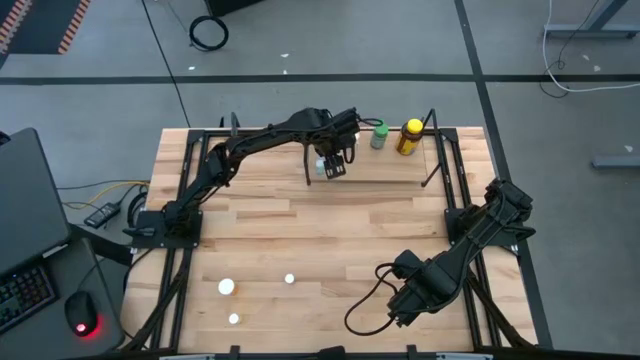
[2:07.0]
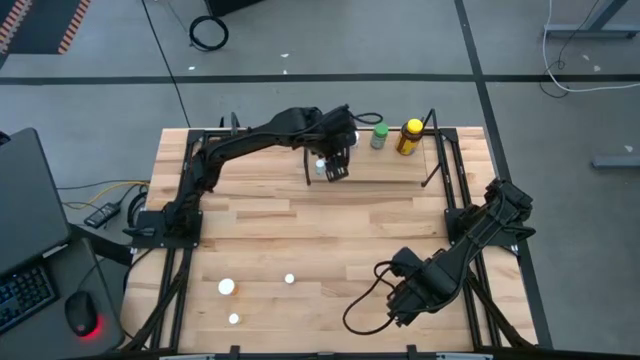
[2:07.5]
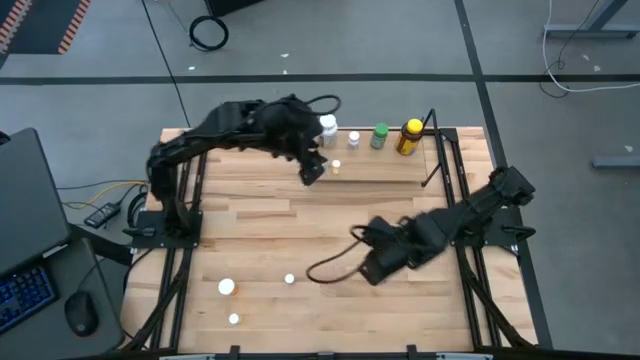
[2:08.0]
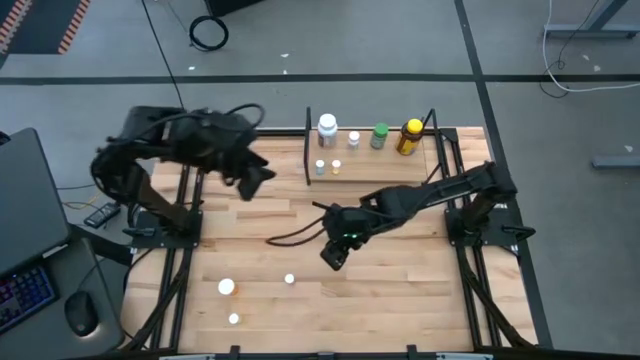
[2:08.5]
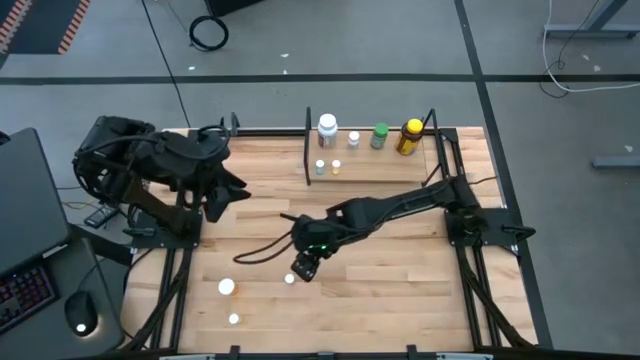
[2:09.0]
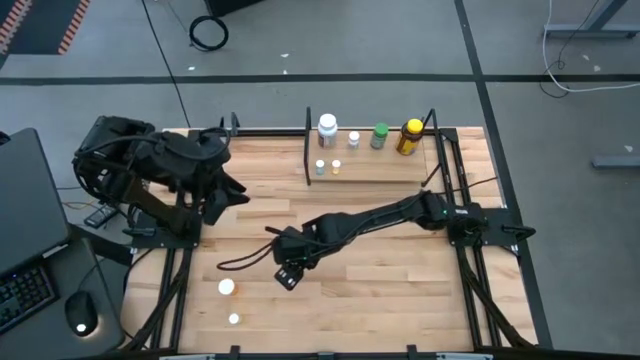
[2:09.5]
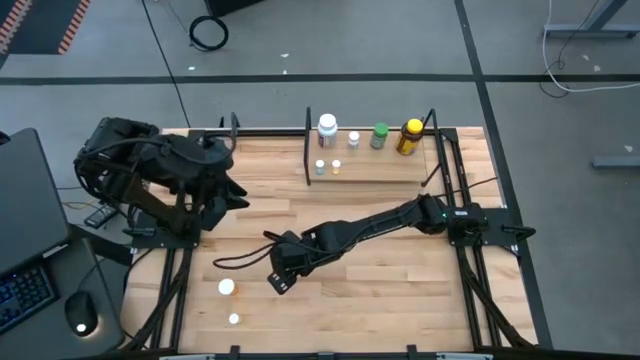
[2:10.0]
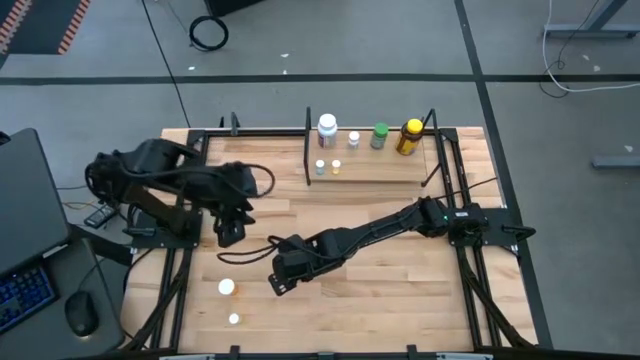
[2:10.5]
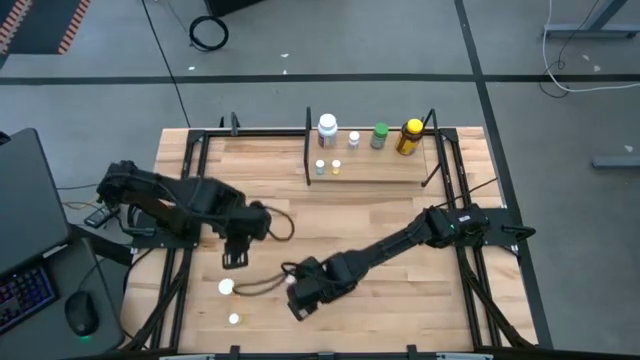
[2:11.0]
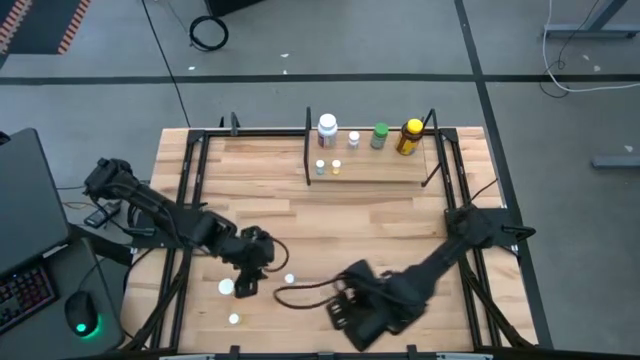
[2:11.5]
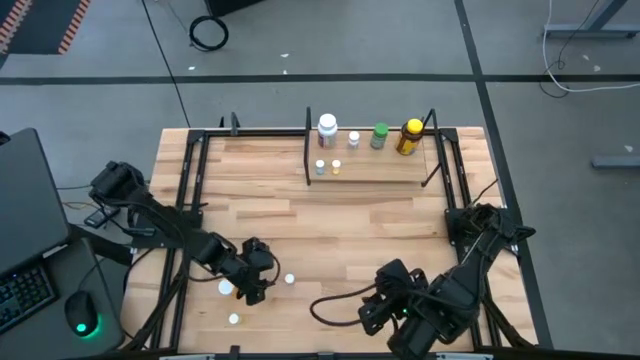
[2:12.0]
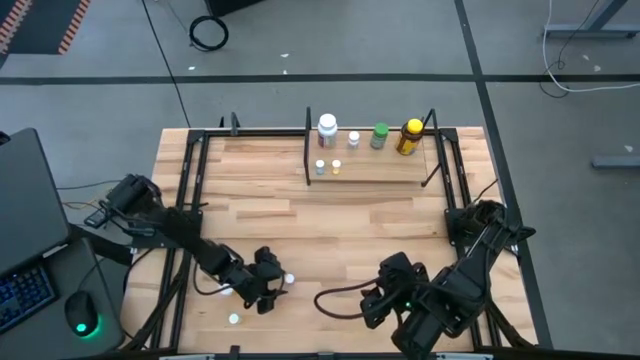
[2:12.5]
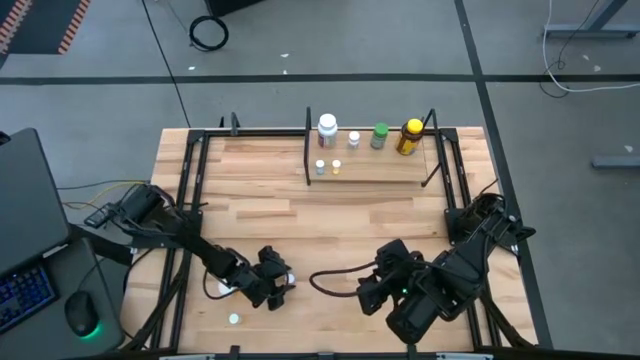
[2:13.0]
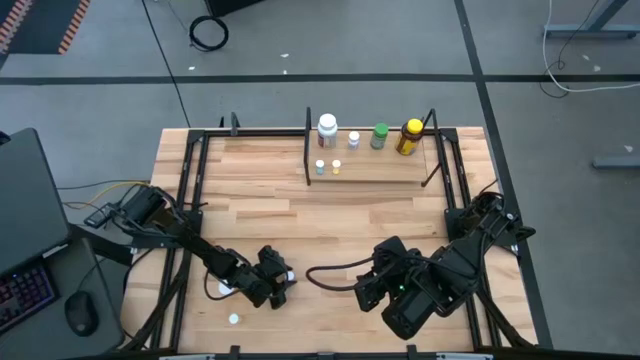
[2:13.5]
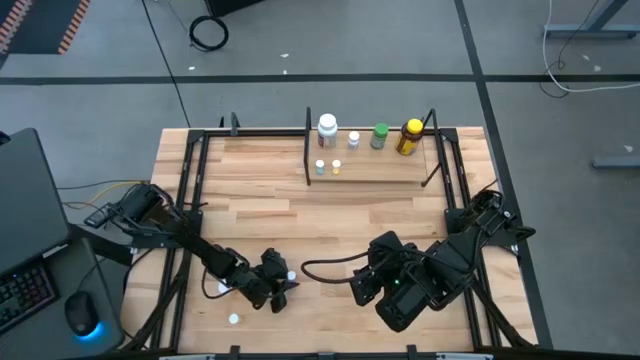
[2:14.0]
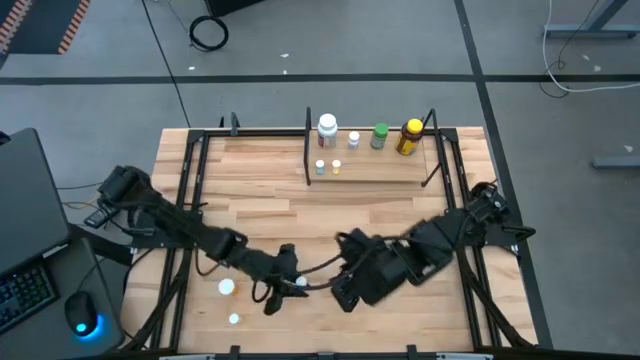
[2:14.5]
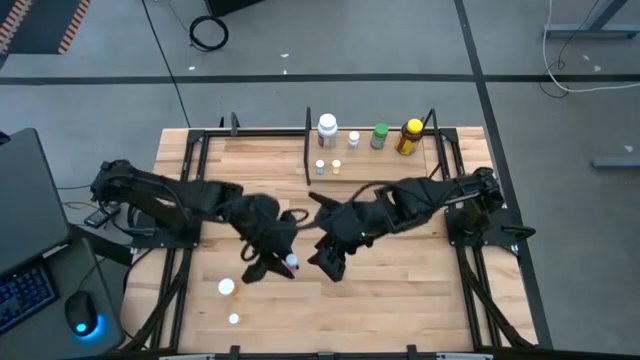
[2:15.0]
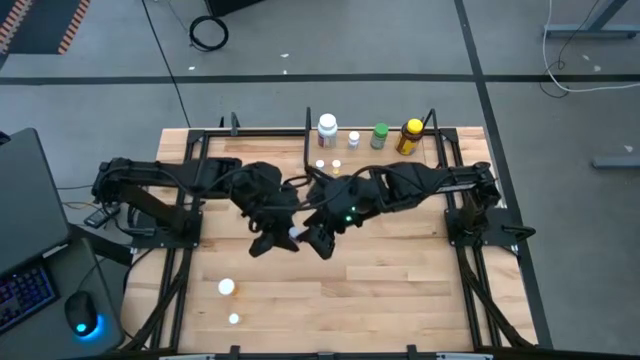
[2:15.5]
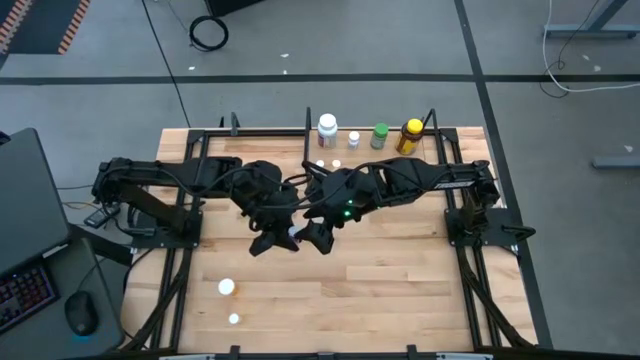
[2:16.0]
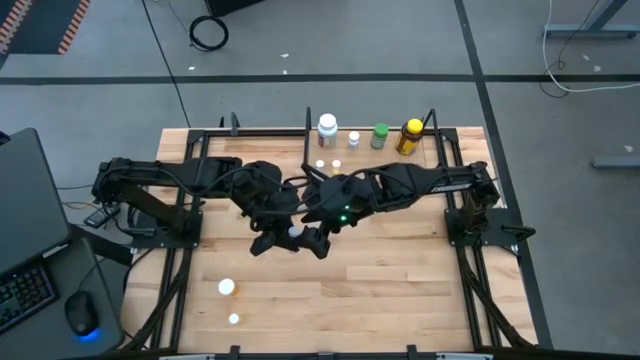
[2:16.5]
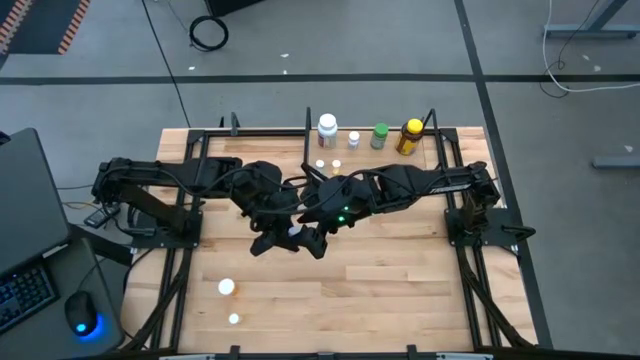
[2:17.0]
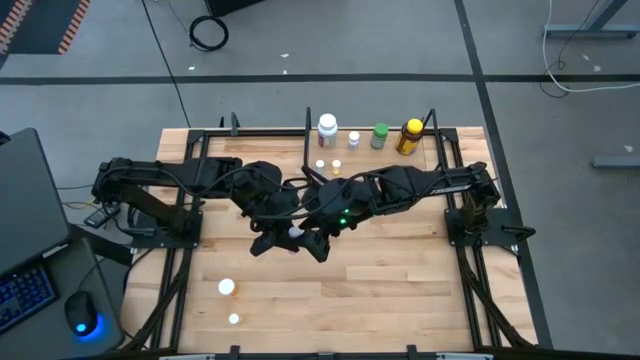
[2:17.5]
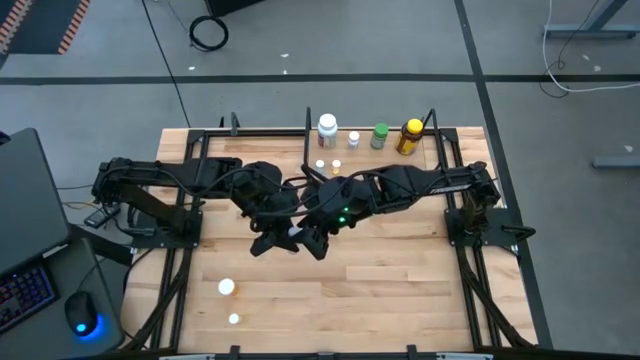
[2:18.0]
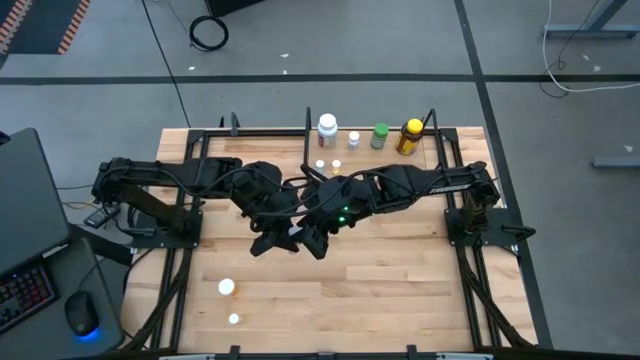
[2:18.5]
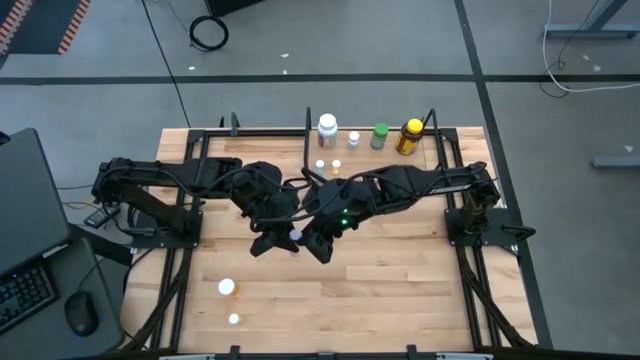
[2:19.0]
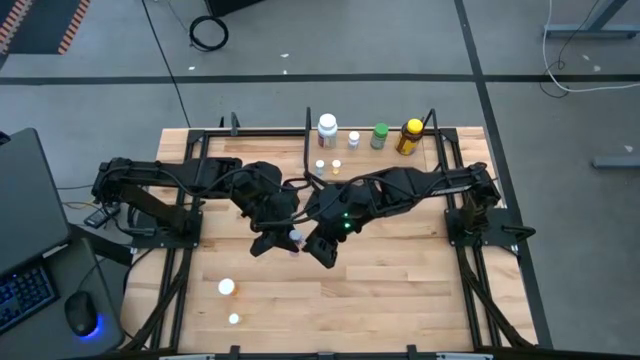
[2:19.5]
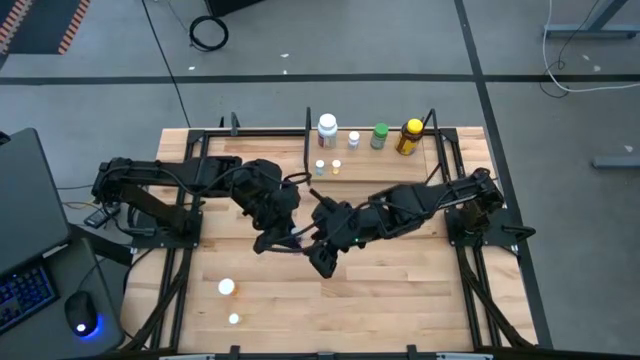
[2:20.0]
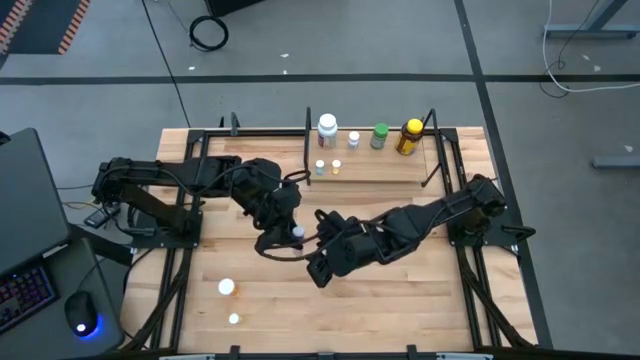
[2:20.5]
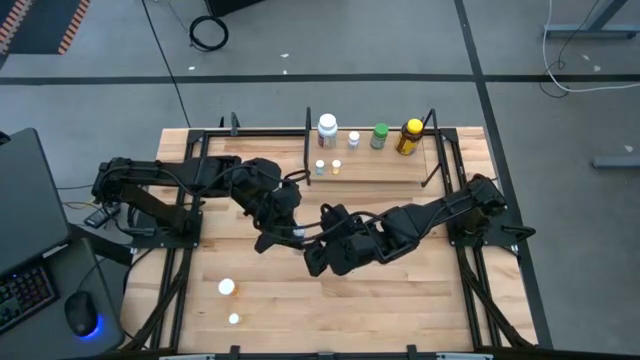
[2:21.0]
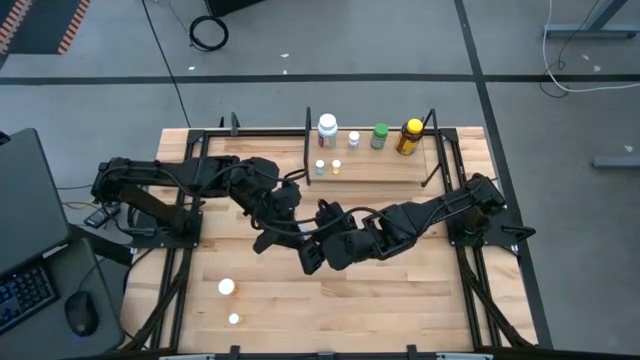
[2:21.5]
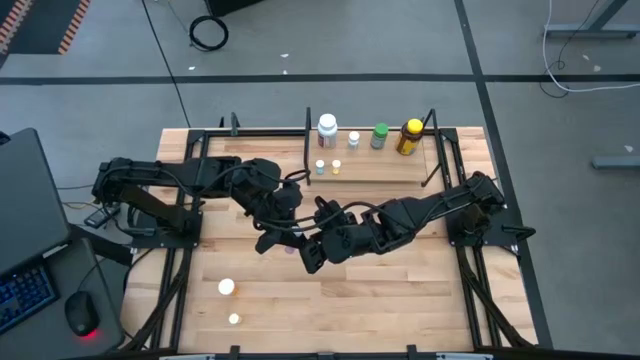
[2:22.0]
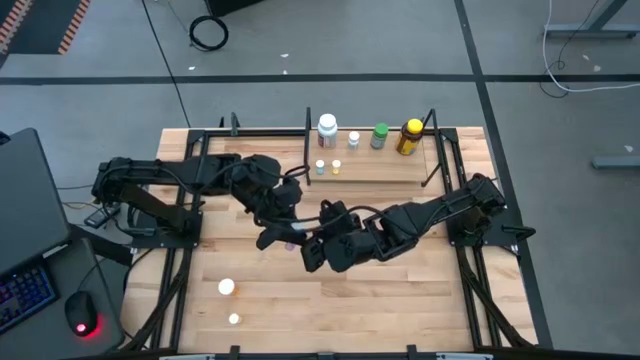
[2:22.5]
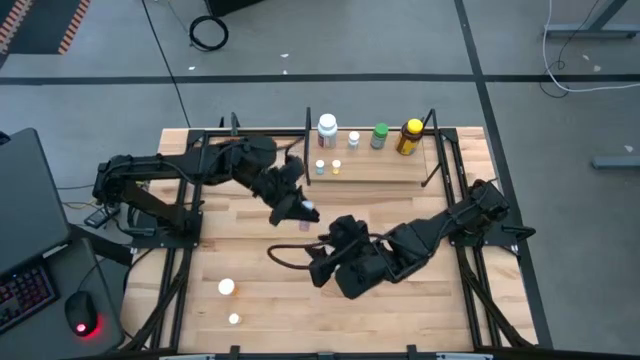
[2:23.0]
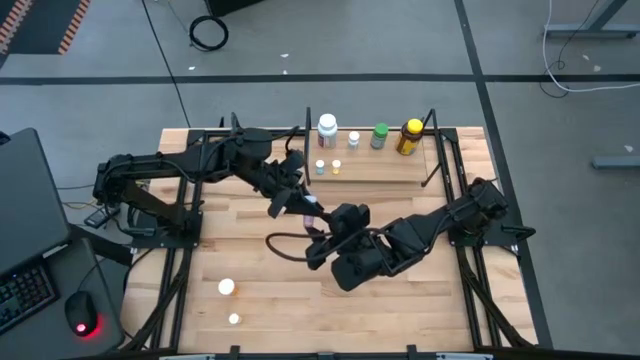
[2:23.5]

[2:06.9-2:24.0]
Task: Pick and place medicine bottles onto shelf by color
Put the pink pill bottle on the shelf

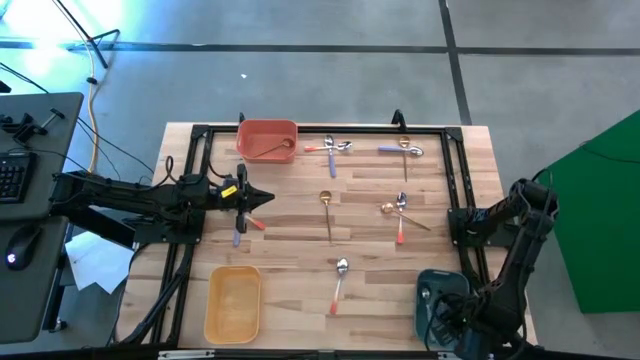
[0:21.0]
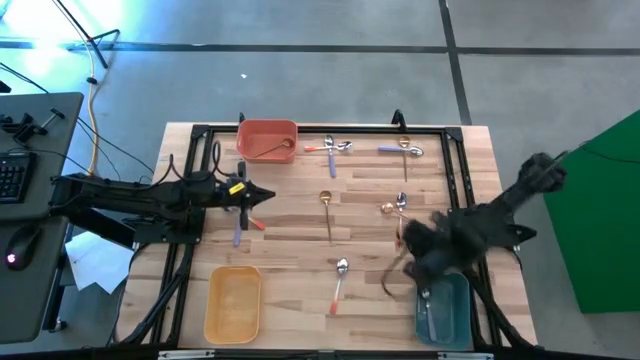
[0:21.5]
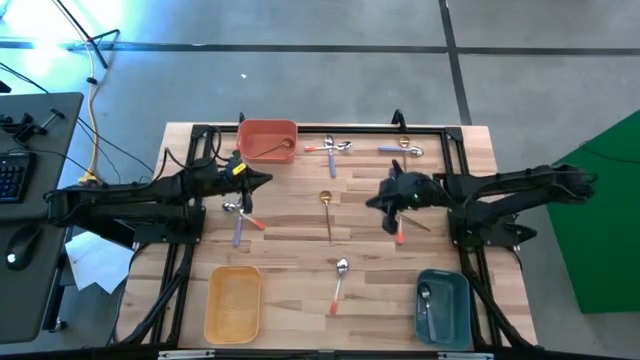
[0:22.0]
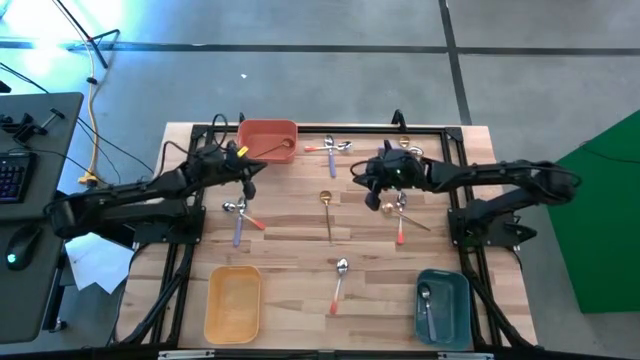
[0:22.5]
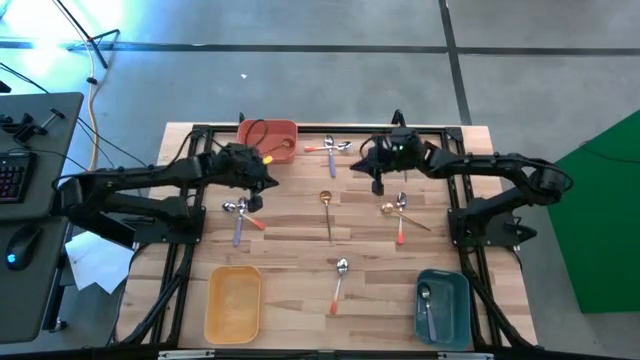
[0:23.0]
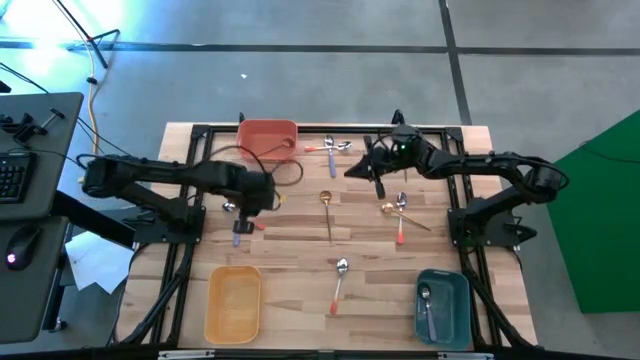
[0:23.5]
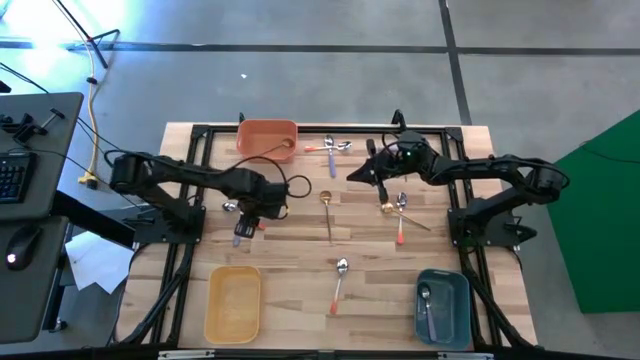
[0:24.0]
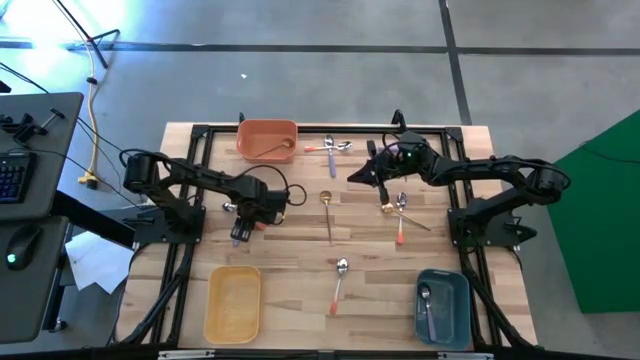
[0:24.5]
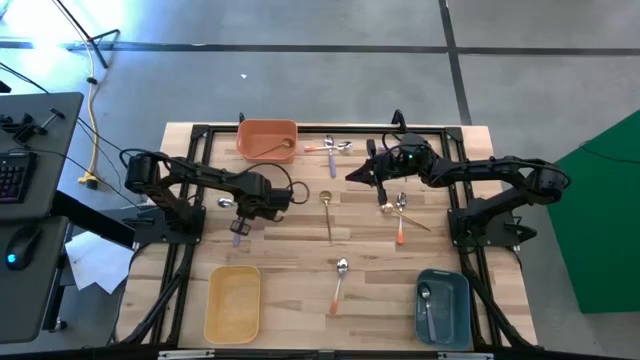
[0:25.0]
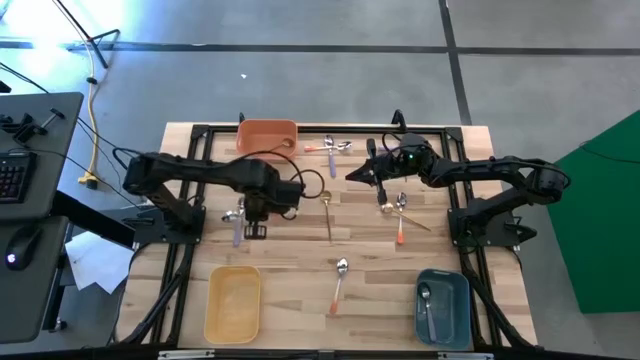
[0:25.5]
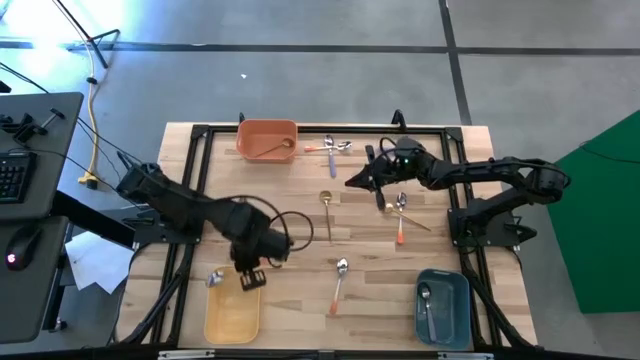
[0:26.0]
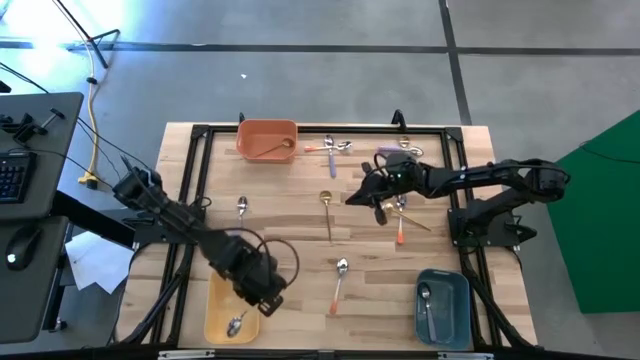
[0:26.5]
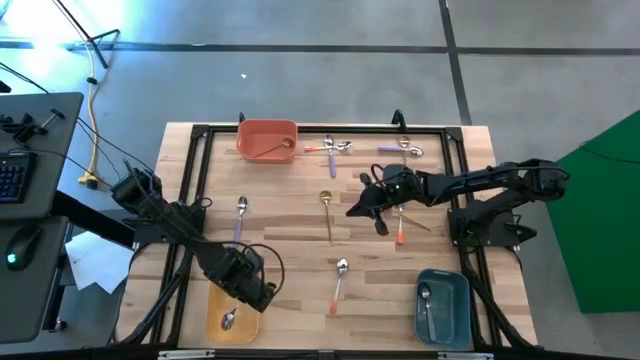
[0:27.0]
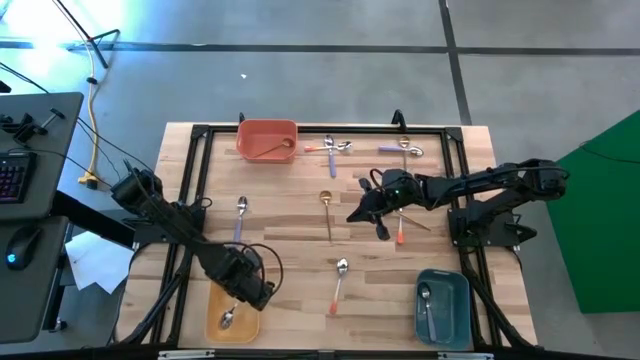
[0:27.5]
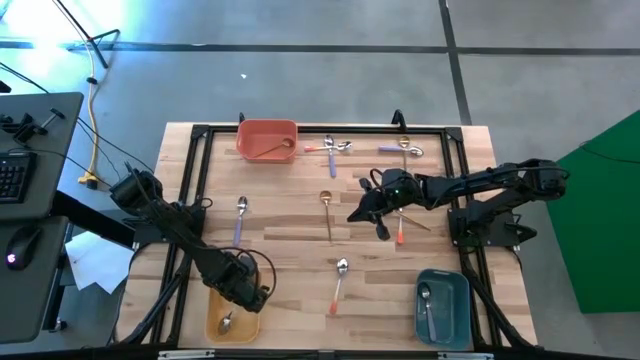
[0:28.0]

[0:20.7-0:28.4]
Task: Sort silverware by color (type)
Put the middle left orange spoon into the yellow bin
